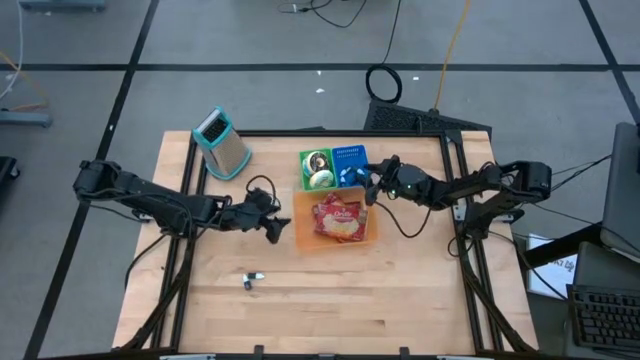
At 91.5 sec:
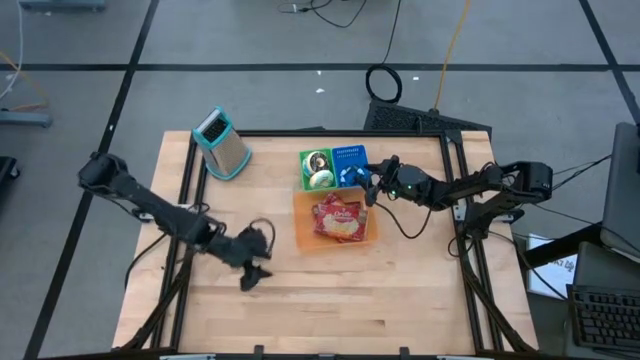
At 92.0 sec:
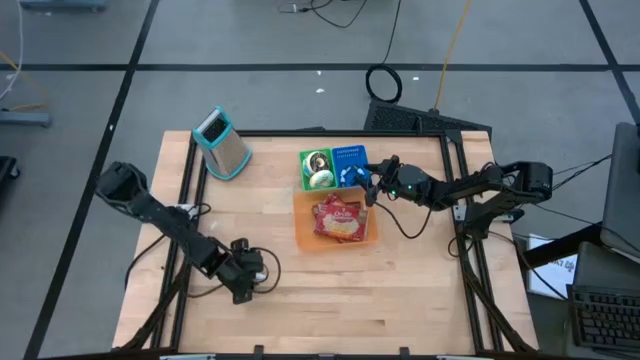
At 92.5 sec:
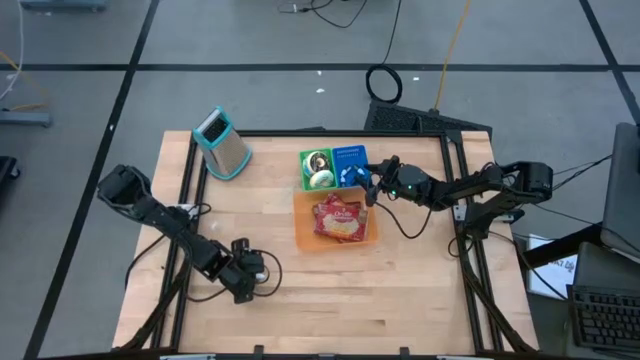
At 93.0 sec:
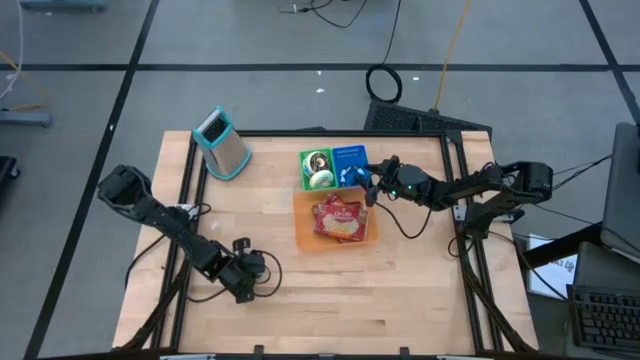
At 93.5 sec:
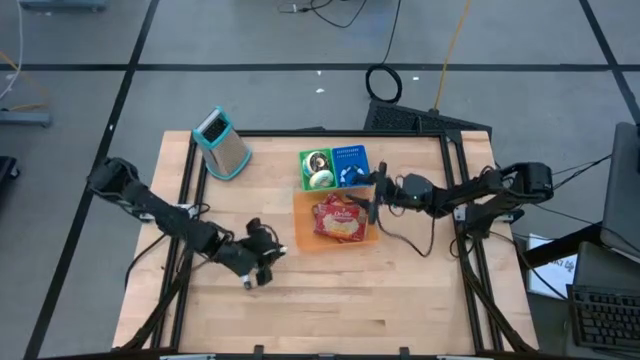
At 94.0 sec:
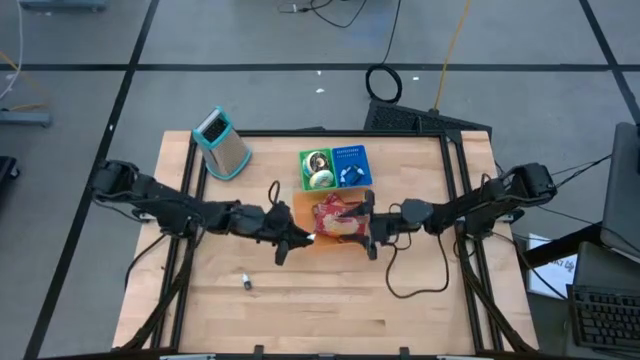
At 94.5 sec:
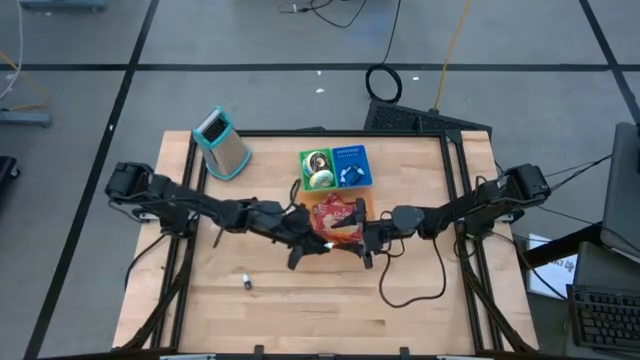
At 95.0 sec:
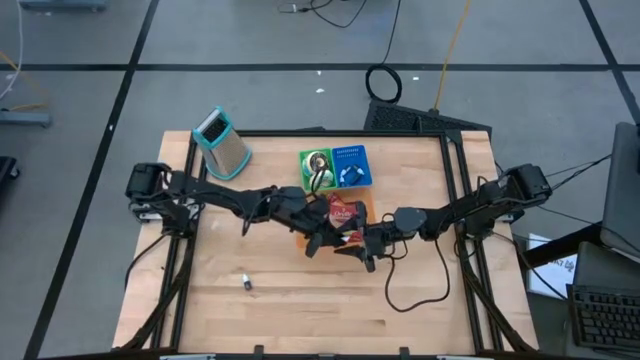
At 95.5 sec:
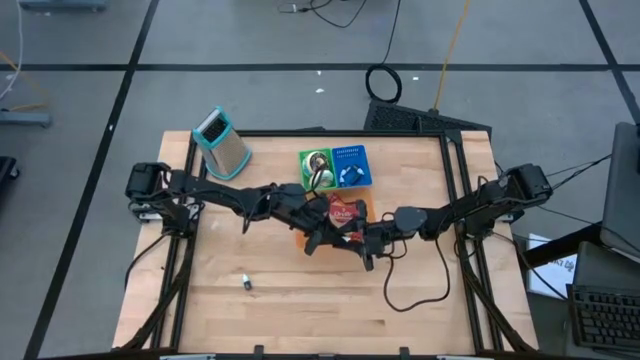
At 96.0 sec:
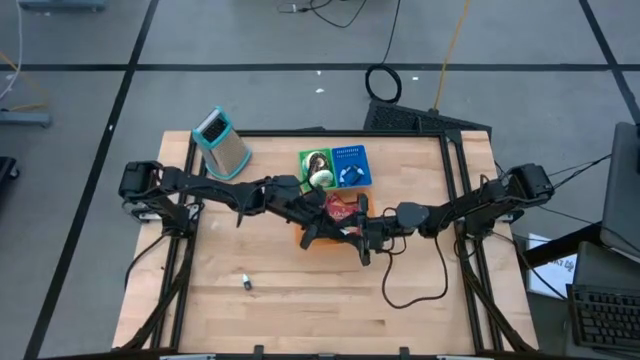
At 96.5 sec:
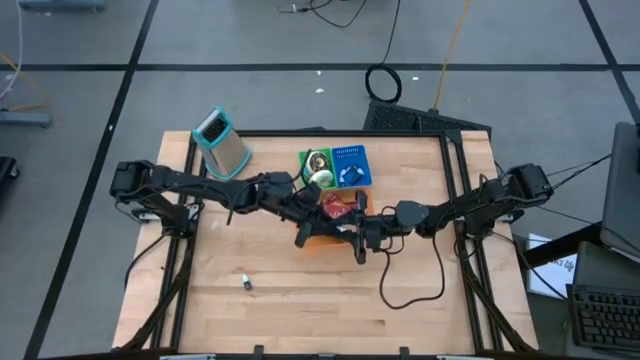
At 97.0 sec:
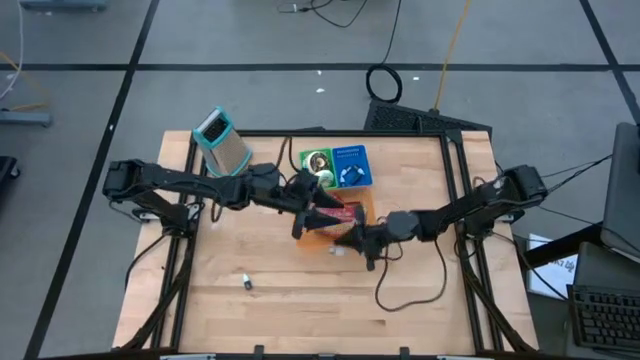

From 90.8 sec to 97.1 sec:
Put the black food coloring bottle into the blue bin

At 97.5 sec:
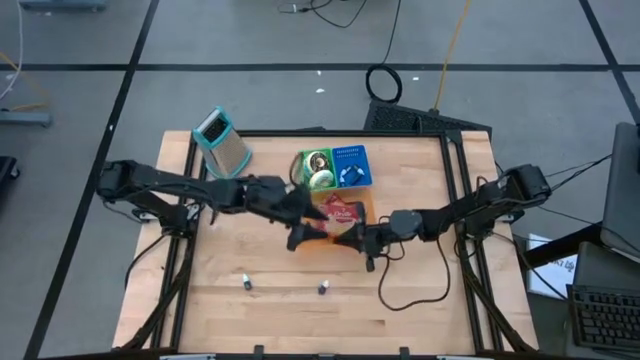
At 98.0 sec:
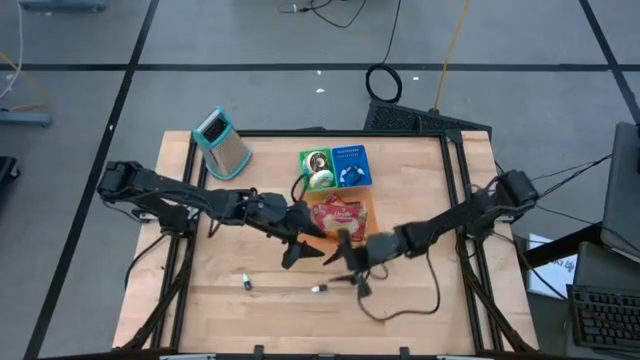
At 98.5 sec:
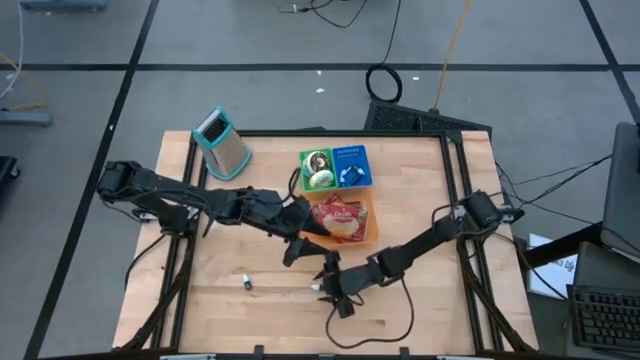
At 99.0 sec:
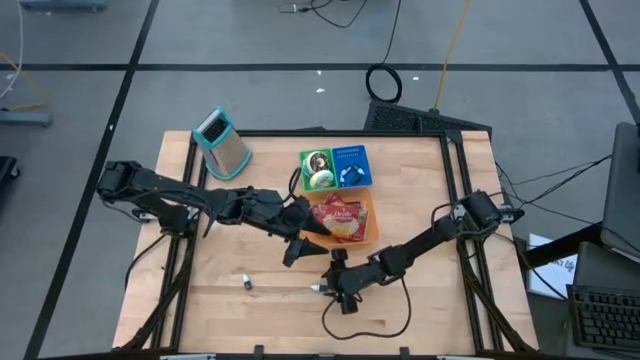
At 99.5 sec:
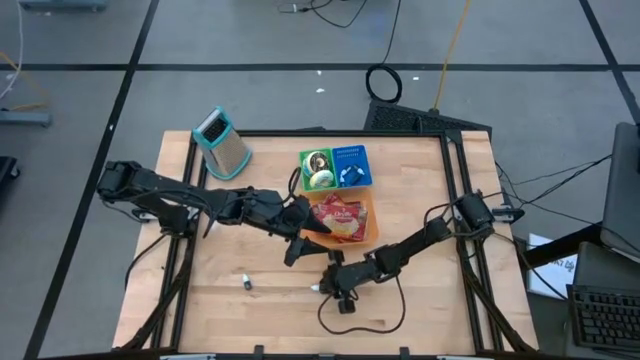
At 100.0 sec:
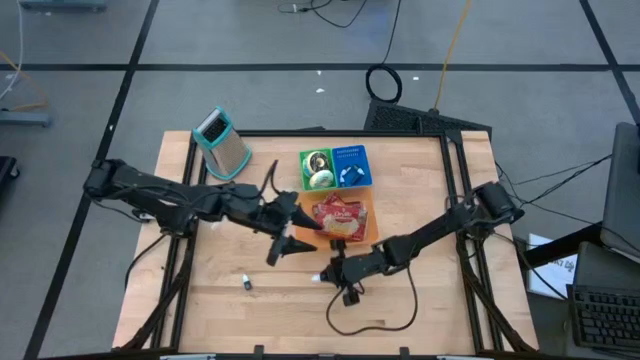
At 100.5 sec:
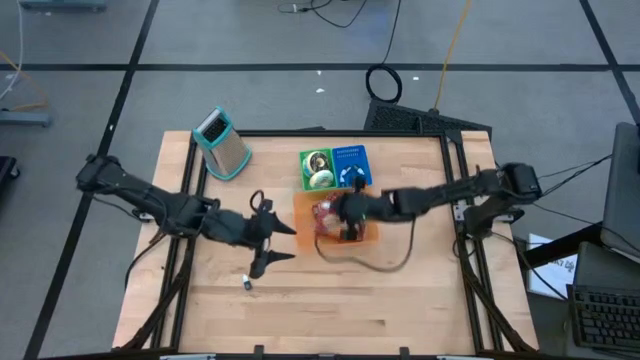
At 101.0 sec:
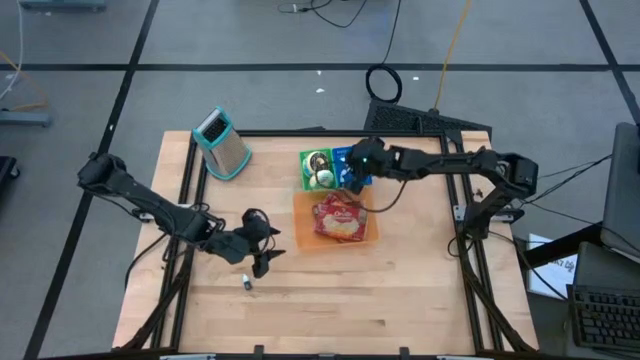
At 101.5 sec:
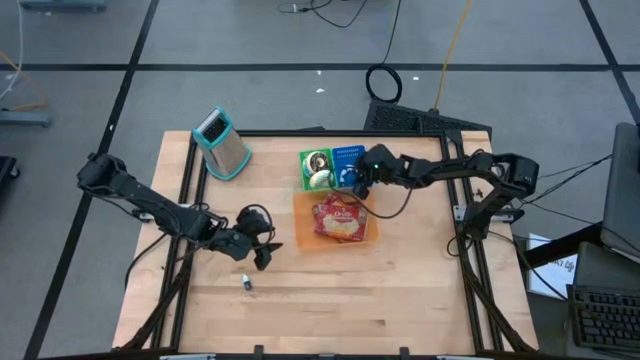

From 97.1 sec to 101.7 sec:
Put the black food coloring bottle into the blue bin

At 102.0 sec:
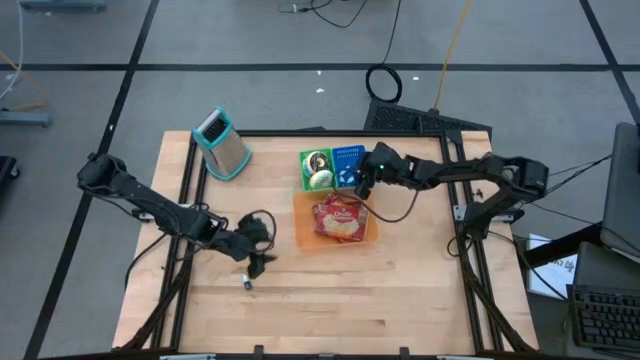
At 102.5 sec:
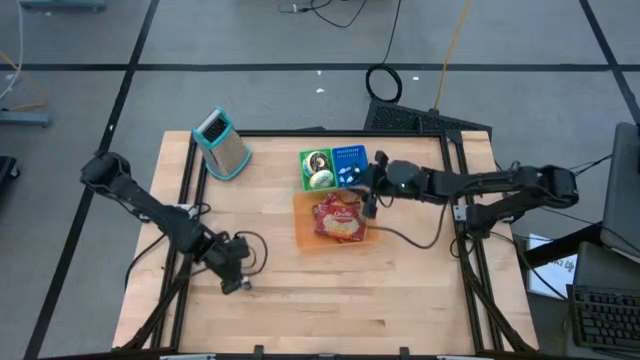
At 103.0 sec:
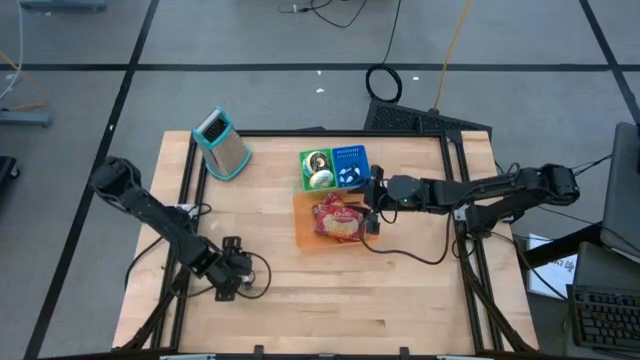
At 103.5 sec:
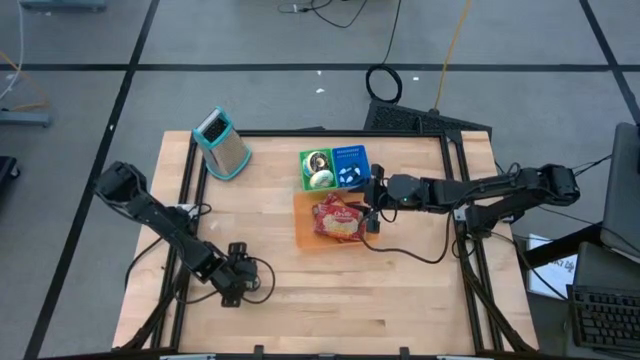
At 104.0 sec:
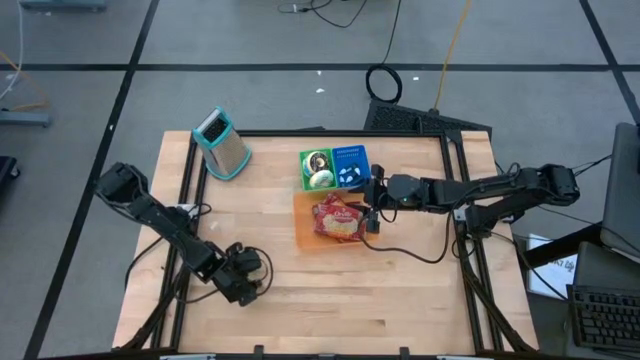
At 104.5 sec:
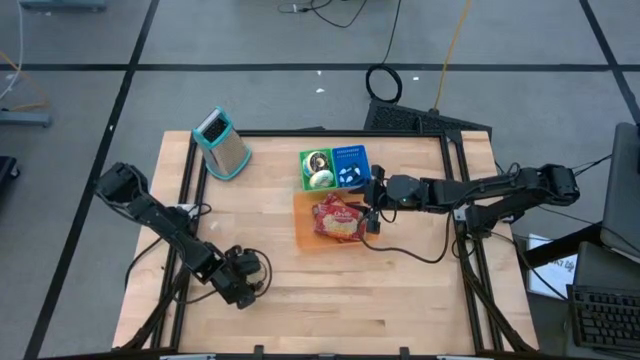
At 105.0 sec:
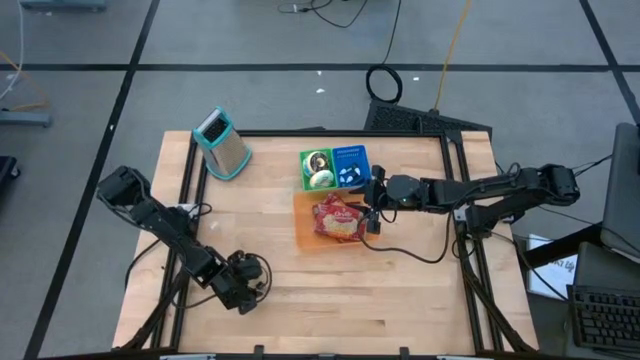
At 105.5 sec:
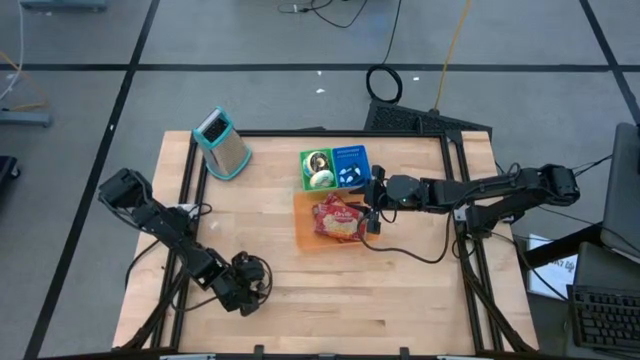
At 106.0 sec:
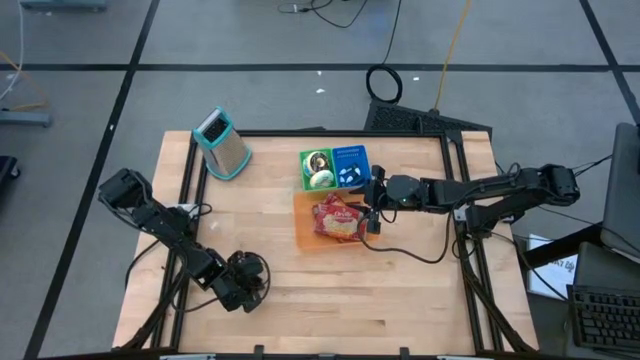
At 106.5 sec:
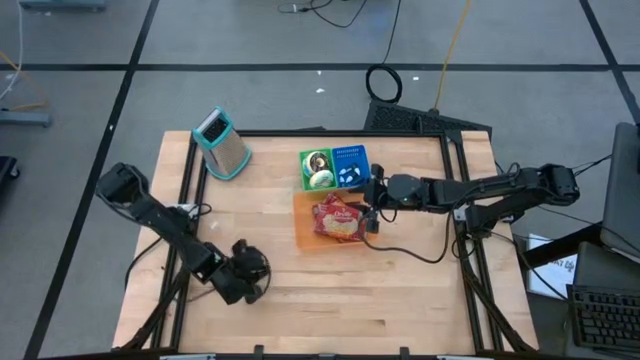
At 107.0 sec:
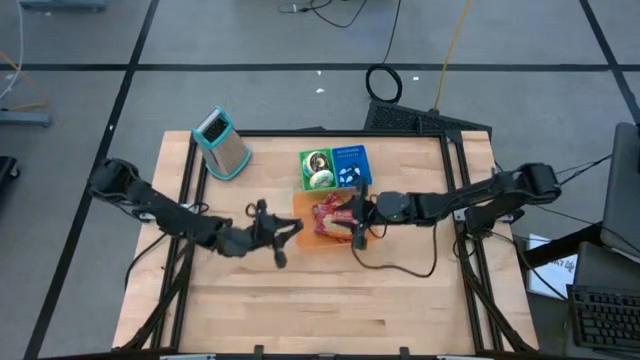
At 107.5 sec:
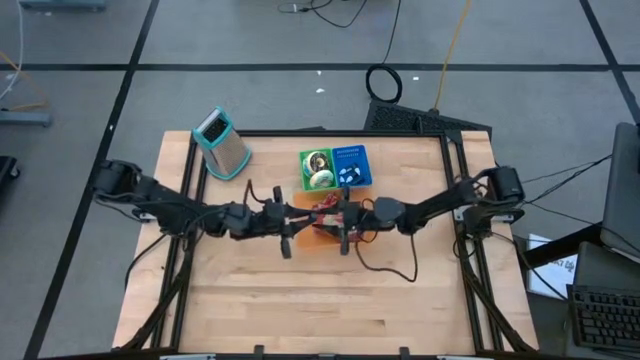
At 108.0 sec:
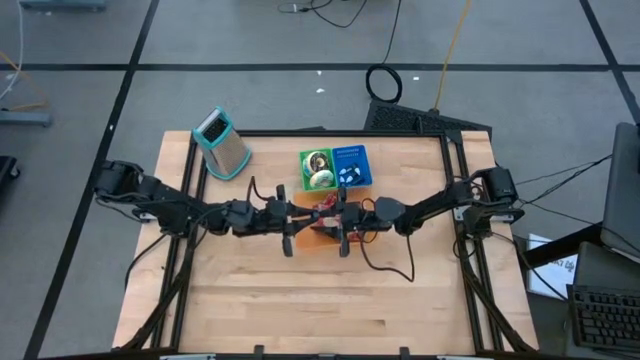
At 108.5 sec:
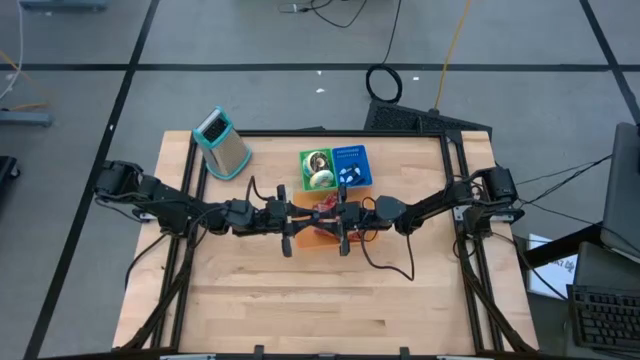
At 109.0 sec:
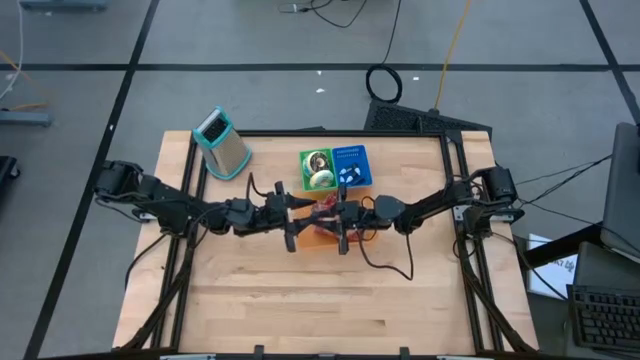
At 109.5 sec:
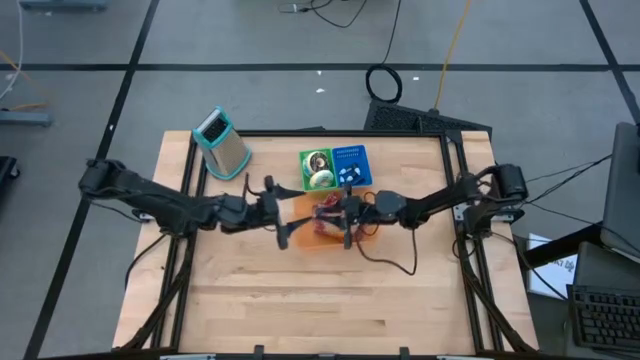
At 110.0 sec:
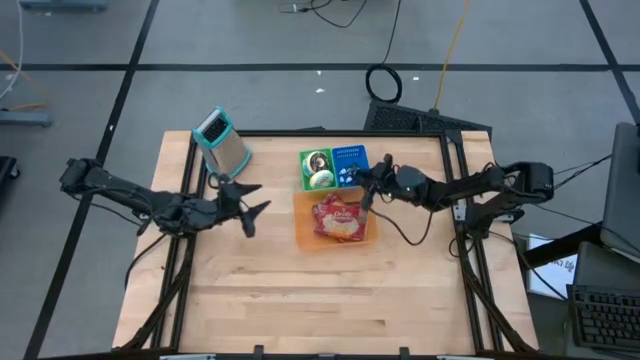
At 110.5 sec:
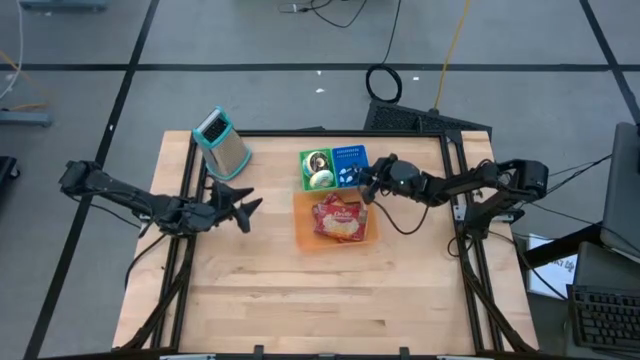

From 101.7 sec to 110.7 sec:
Put the violet food coloring bottle into the blue bin
